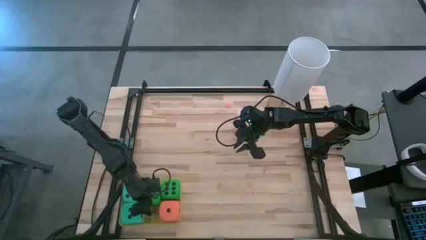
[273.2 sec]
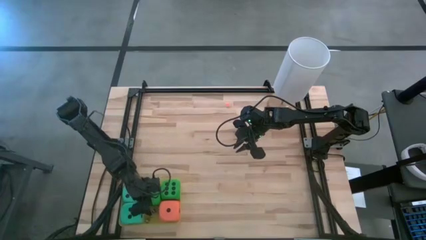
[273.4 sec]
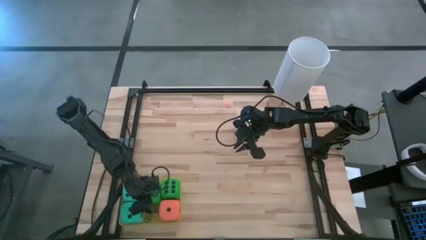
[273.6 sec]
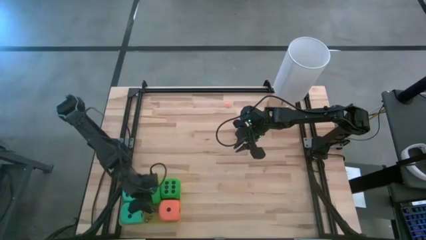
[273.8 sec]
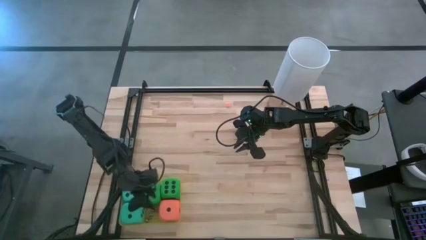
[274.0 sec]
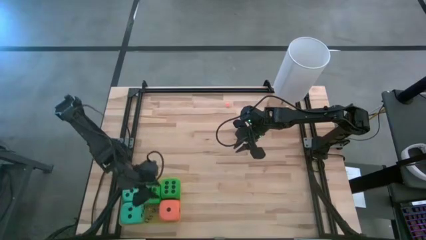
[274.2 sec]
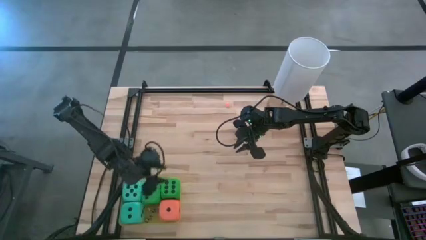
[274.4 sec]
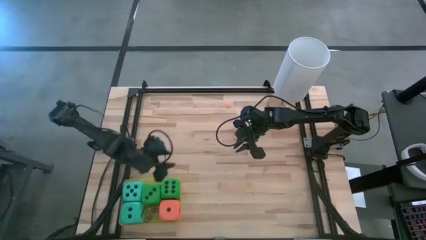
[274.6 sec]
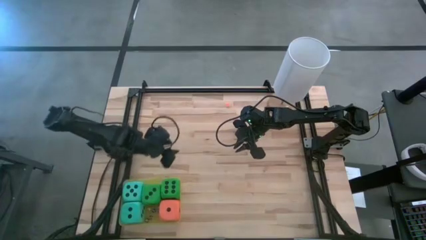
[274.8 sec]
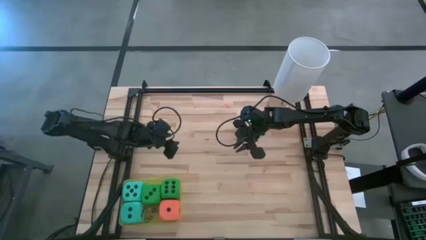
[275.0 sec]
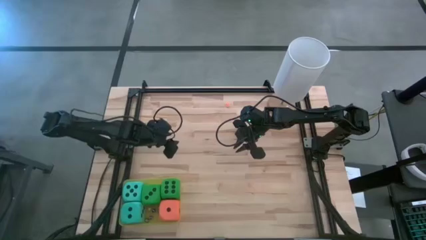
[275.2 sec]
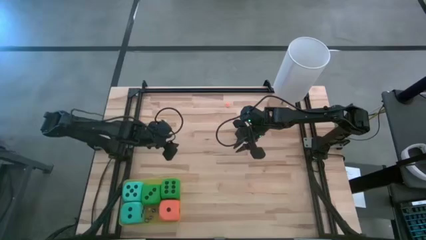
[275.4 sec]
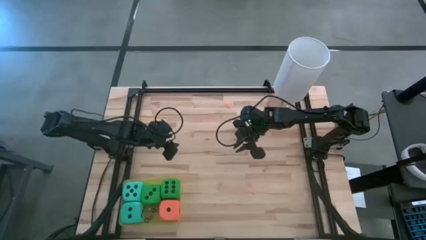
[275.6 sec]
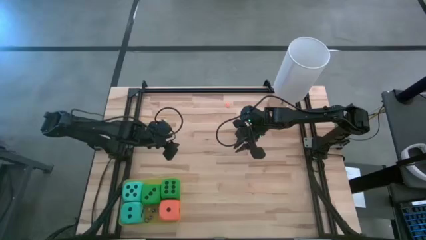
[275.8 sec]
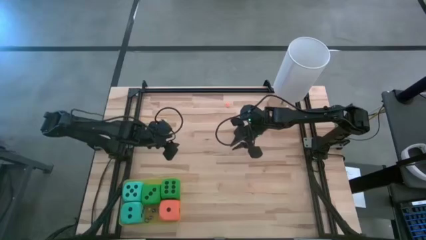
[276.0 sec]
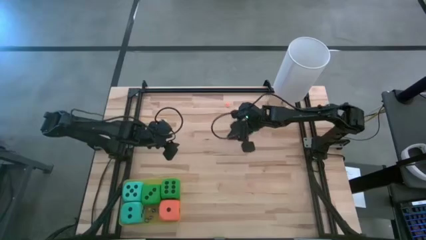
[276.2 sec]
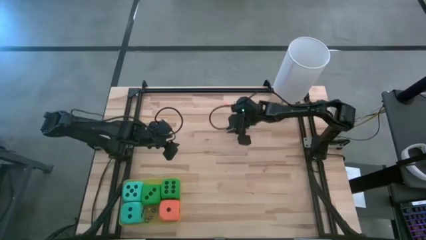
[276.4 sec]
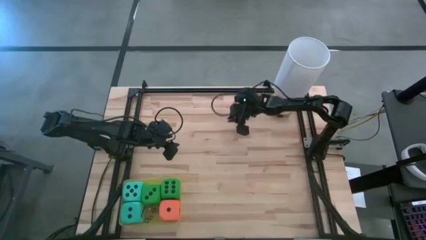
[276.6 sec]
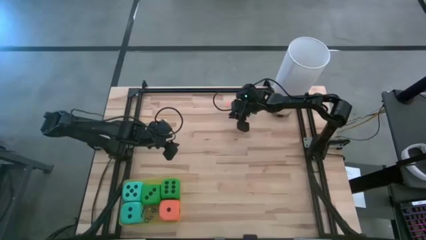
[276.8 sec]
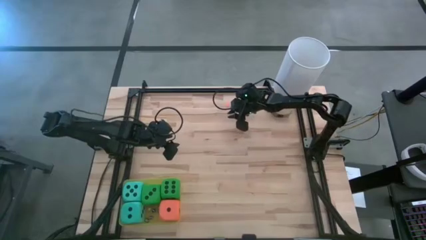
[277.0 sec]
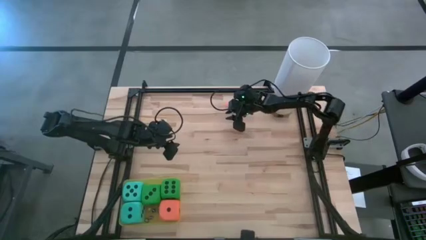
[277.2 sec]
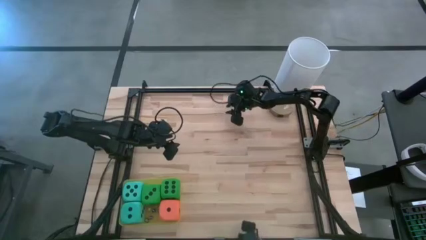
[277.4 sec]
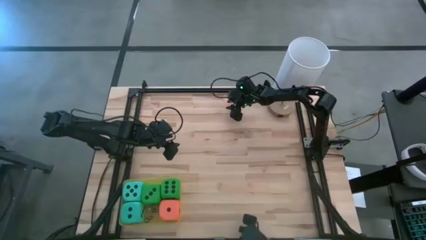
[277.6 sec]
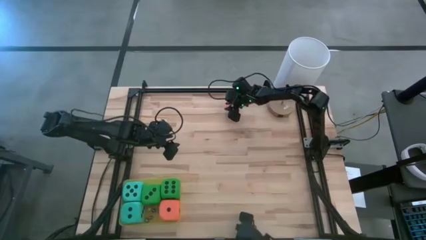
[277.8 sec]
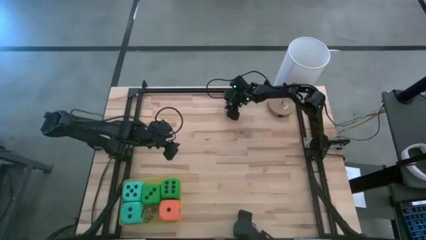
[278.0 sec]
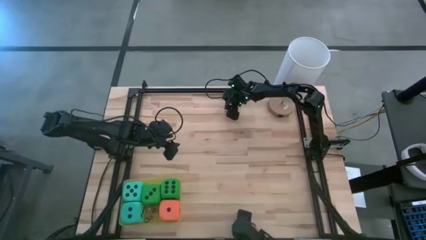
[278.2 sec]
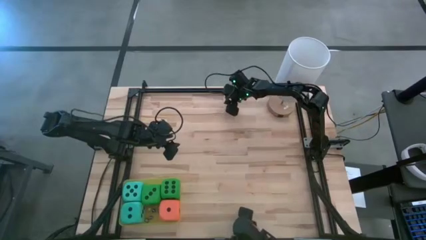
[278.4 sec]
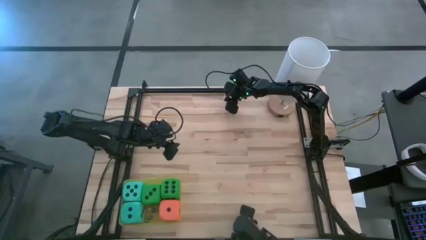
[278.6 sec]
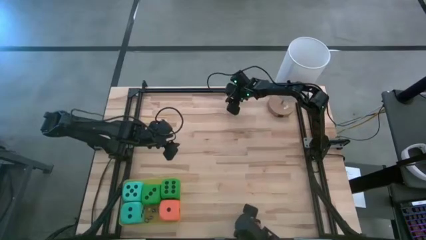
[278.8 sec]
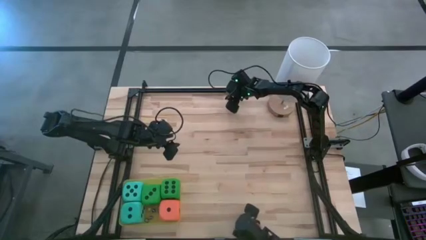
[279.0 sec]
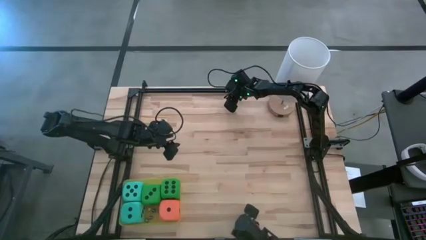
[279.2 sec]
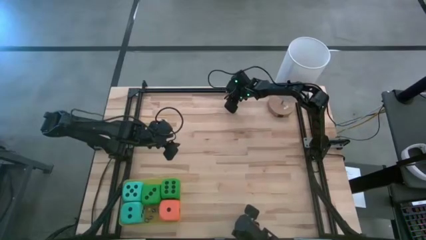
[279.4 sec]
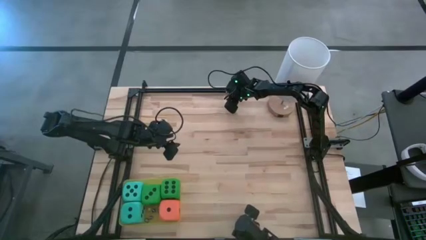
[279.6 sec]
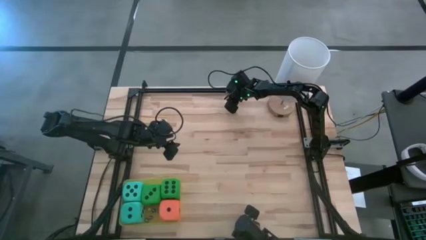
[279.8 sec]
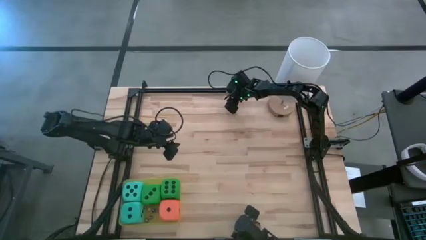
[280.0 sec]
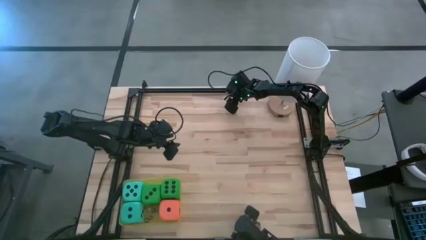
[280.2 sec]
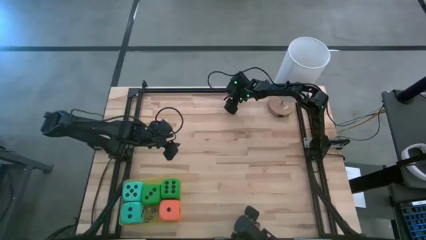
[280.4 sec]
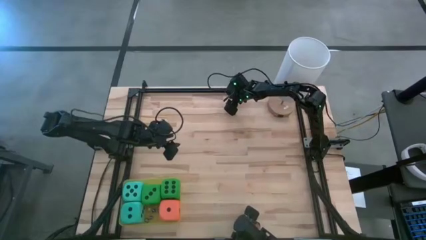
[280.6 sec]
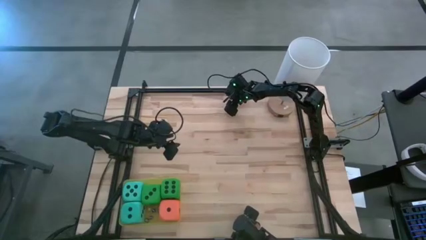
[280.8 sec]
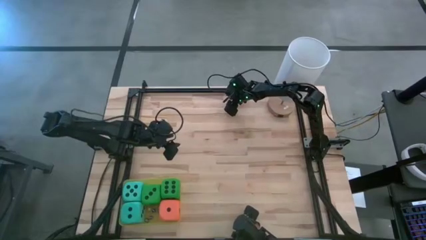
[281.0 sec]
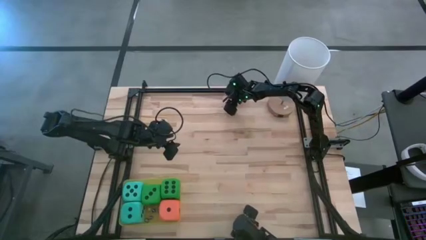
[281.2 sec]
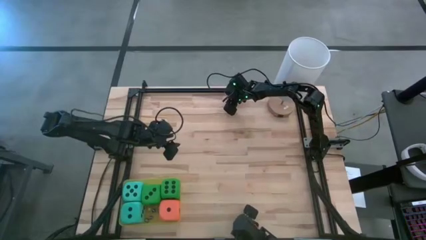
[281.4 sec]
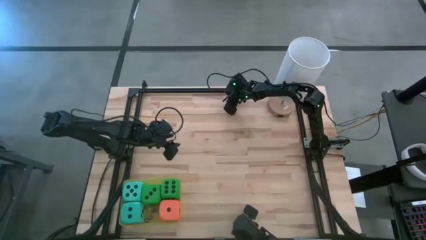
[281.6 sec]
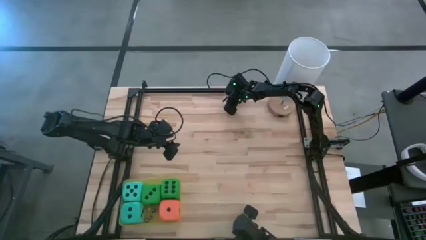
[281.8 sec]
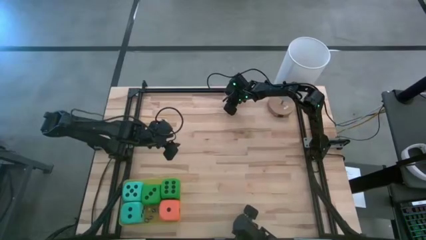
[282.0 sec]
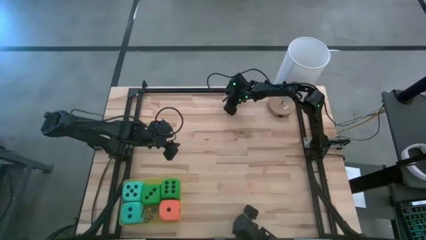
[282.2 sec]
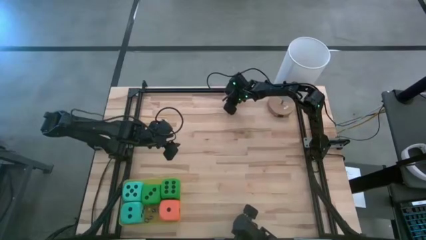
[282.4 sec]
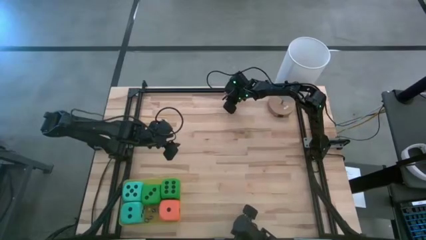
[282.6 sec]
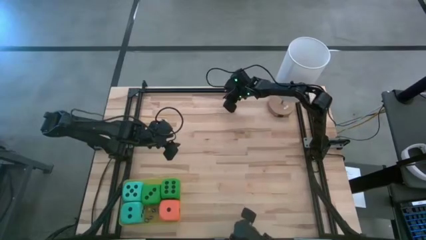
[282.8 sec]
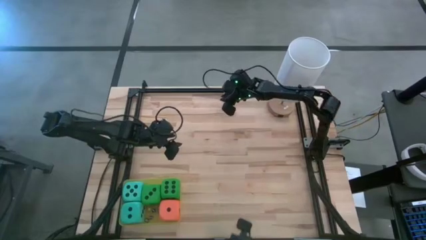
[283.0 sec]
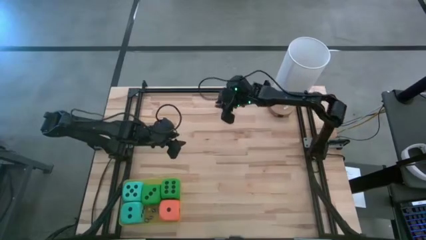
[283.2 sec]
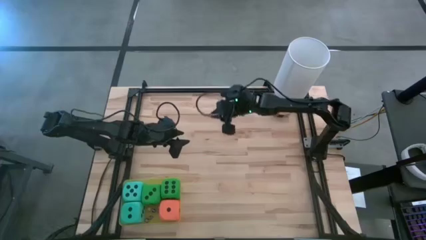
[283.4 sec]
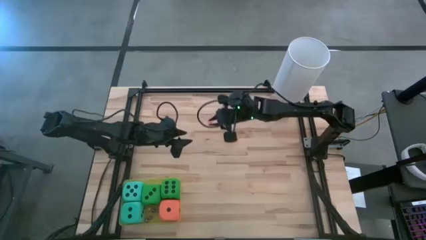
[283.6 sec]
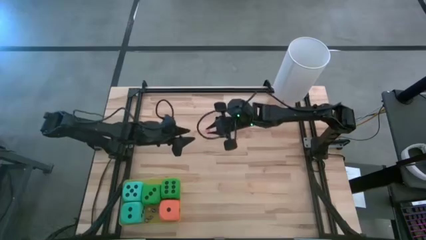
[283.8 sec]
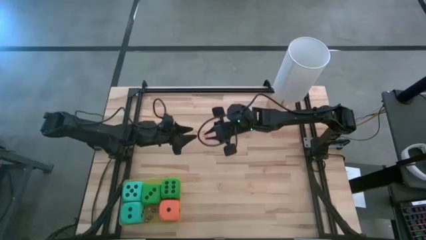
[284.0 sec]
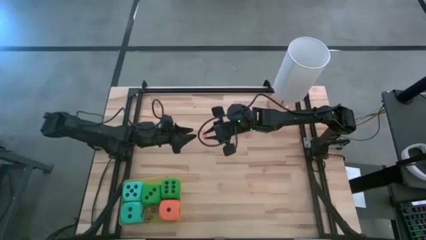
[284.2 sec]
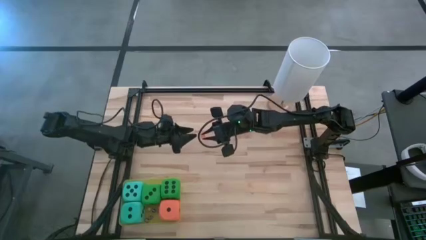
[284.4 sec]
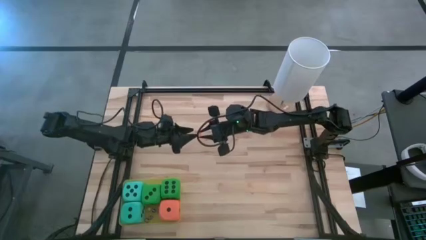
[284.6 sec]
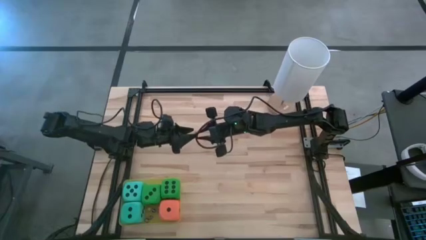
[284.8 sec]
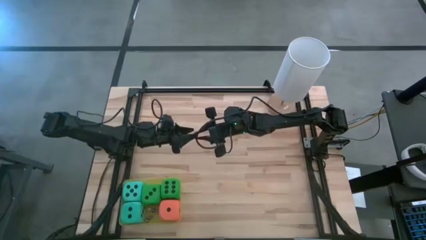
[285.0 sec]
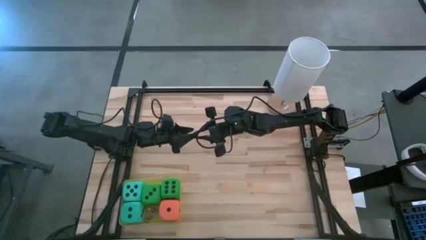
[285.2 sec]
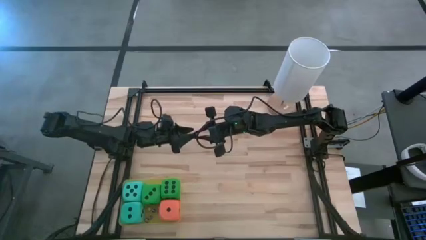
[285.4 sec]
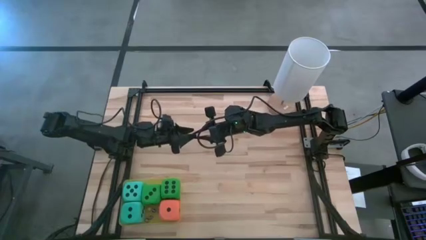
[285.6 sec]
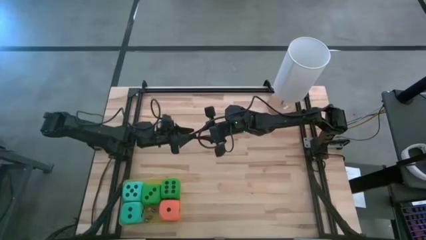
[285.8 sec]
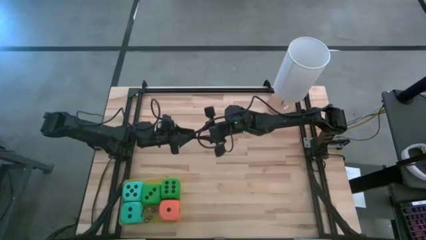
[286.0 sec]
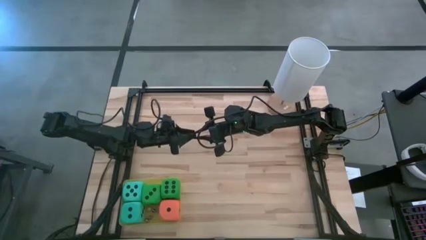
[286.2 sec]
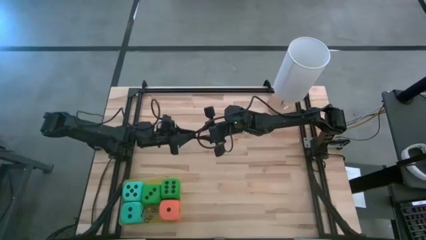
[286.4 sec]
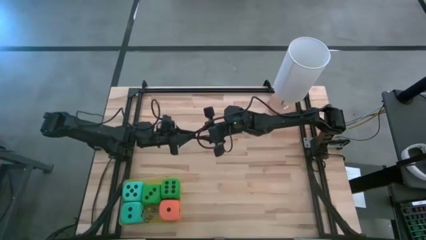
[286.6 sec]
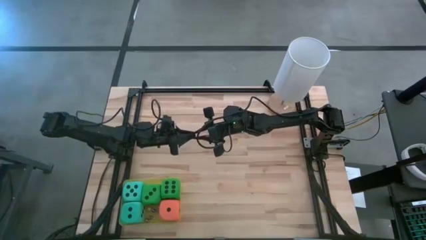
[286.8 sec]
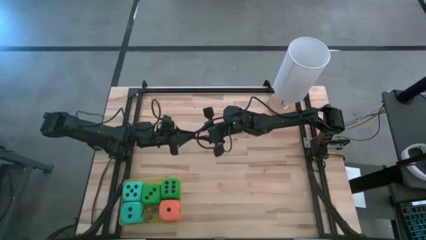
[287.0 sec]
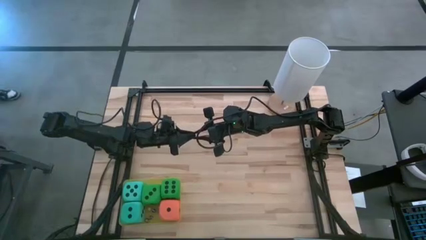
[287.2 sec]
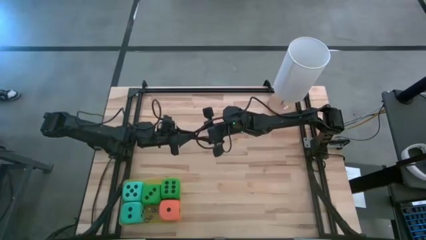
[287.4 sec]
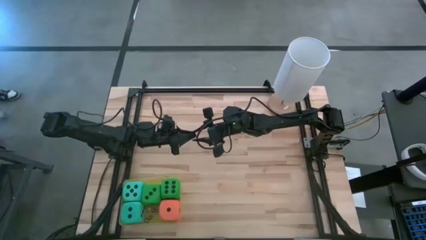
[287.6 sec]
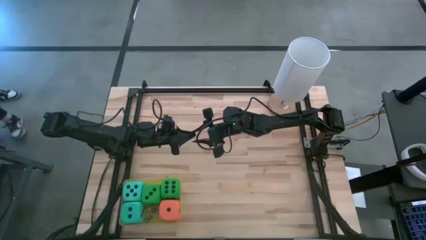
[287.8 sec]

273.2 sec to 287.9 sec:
Task: Pick & Place Dice
Put the orange dice into the yellow bin
